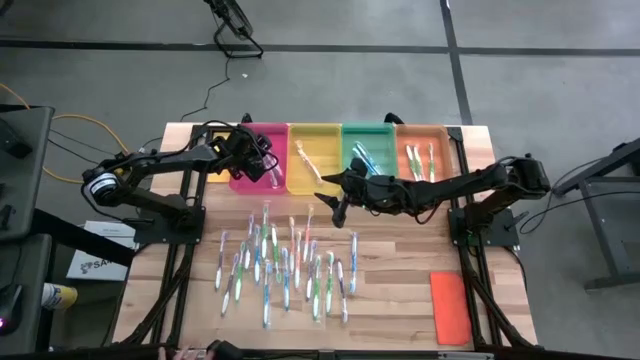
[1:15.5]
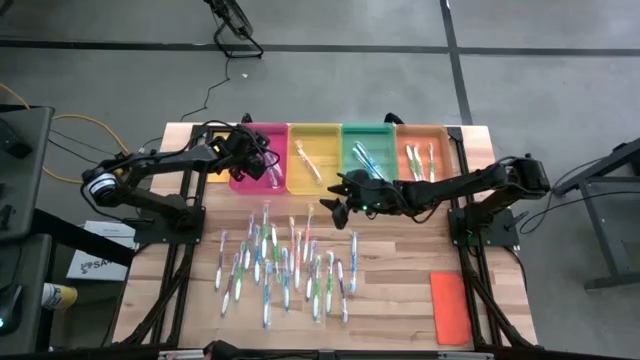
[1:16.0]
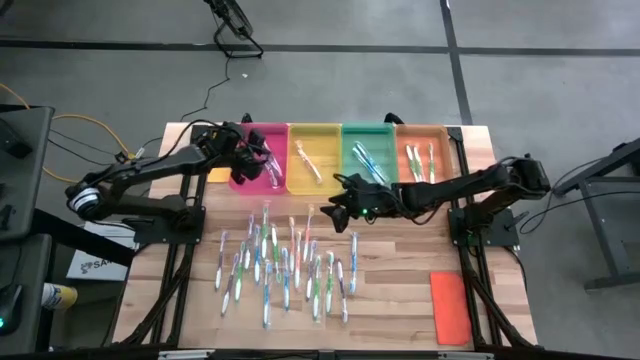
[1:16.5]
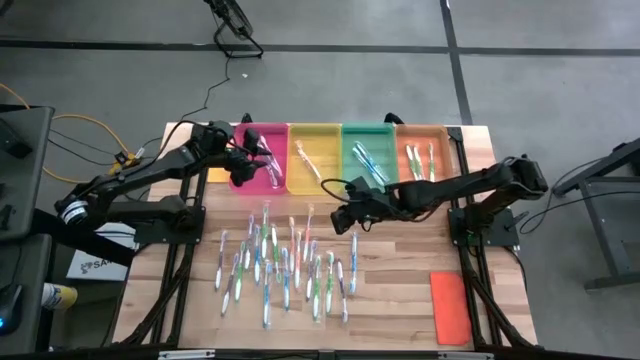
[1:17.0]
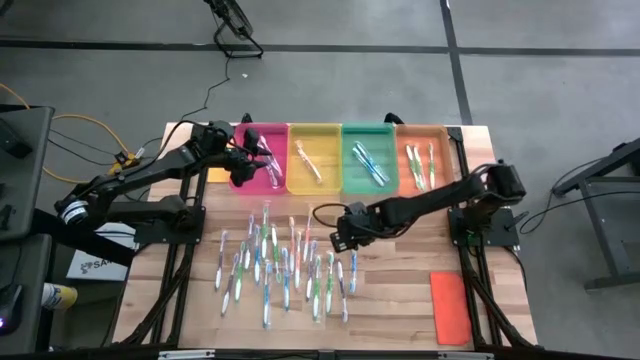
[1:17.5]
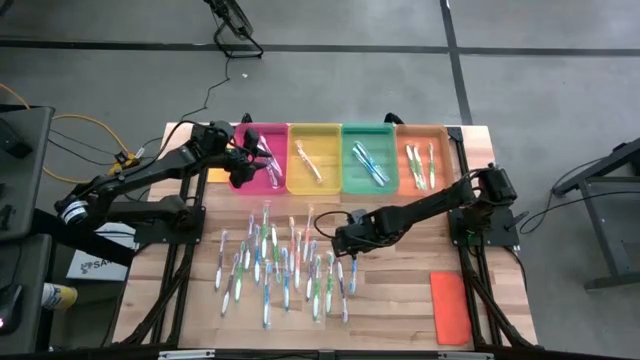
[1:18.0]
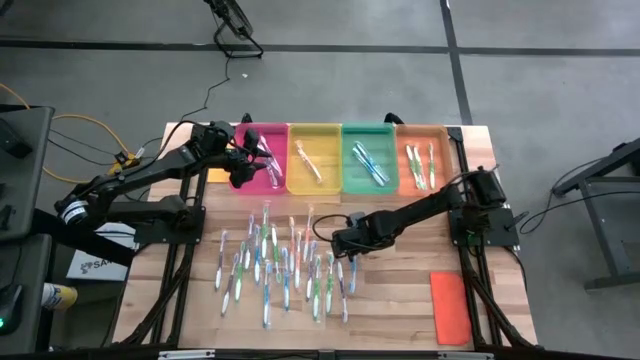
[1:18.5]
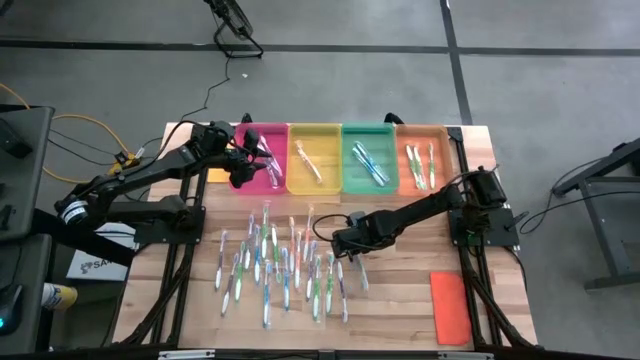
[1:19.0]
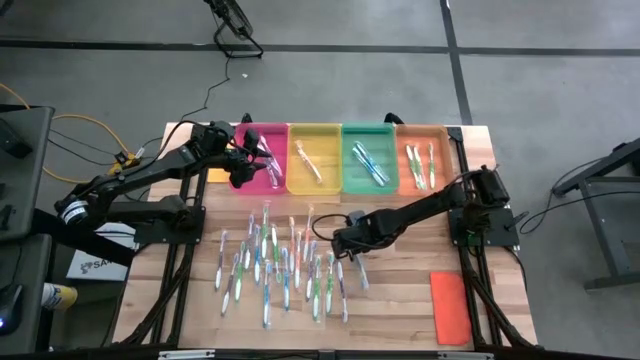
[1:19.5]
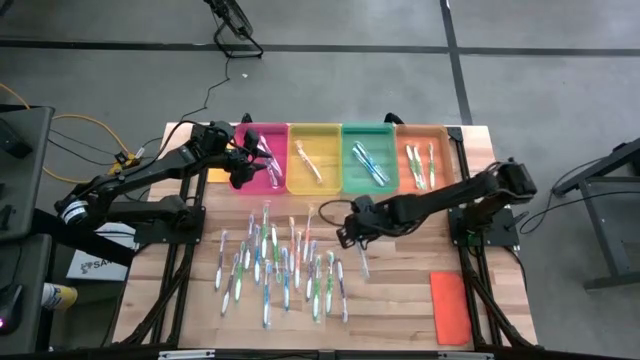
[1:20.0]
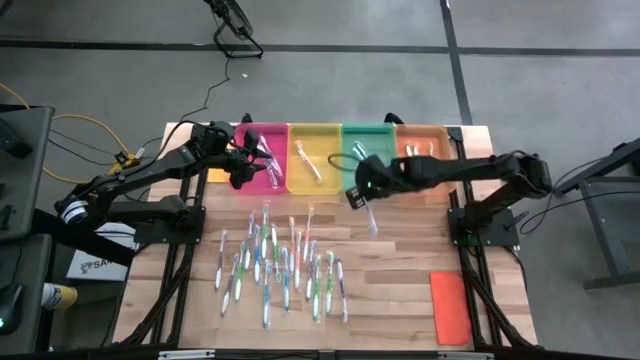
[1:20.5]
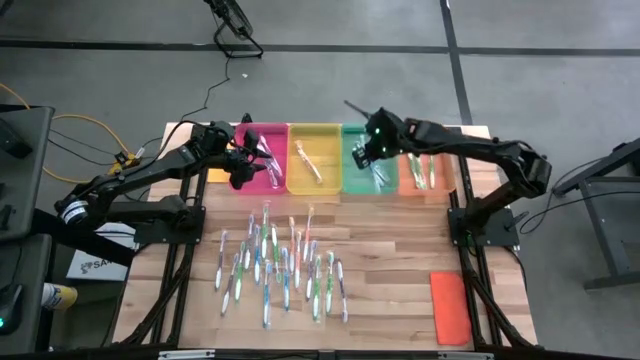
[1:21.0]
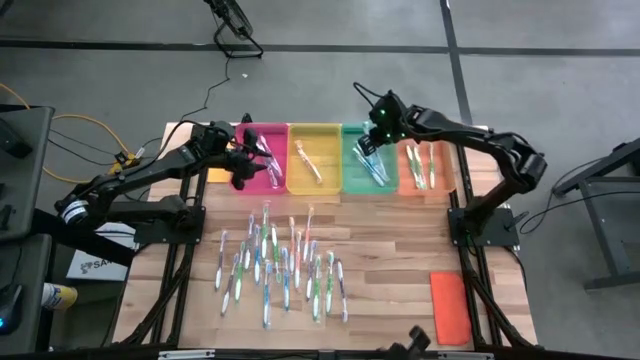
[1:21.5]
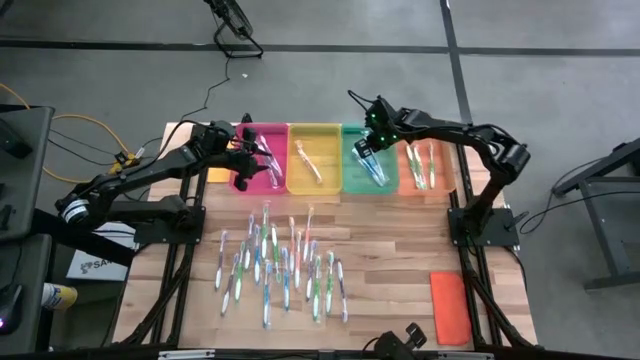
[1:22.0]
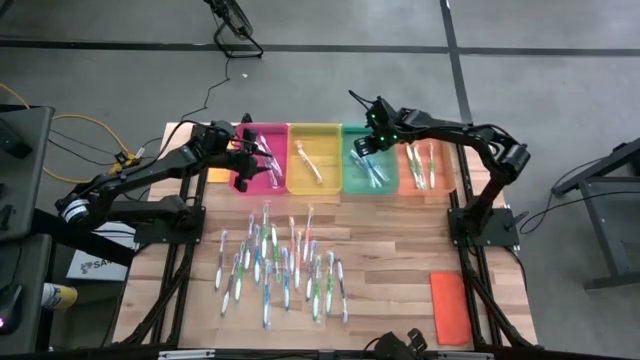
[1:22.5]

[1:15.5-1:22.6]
Task: Pick & Place Toothbrushes
Put the blue toothbrush into the green bin

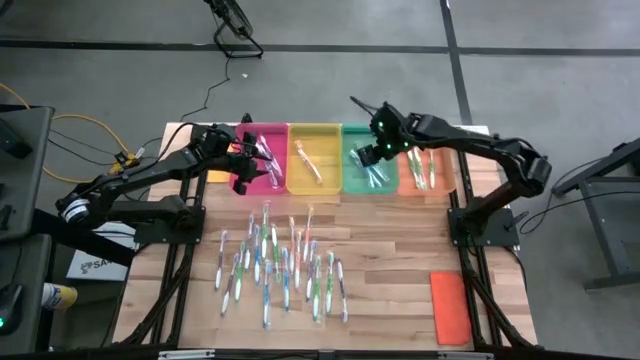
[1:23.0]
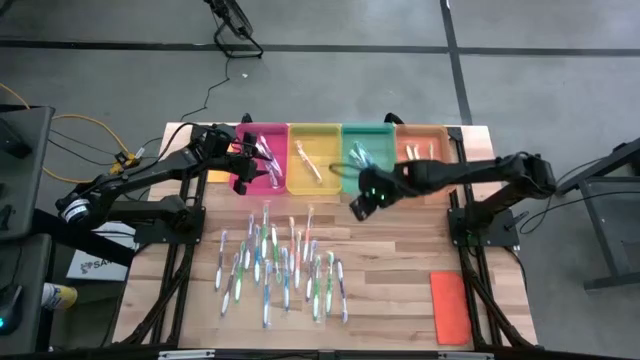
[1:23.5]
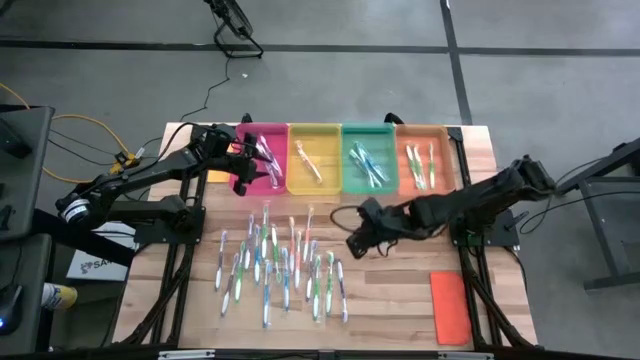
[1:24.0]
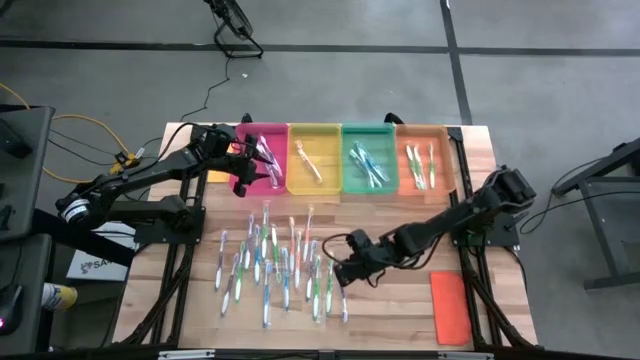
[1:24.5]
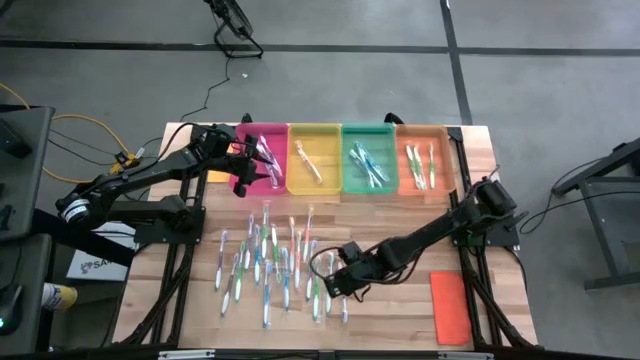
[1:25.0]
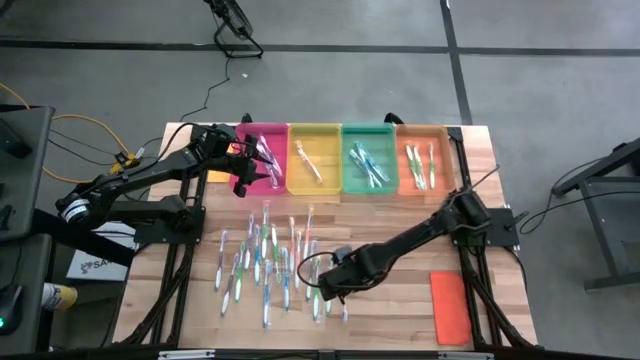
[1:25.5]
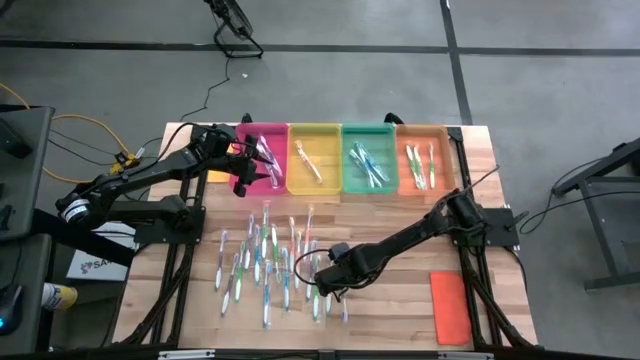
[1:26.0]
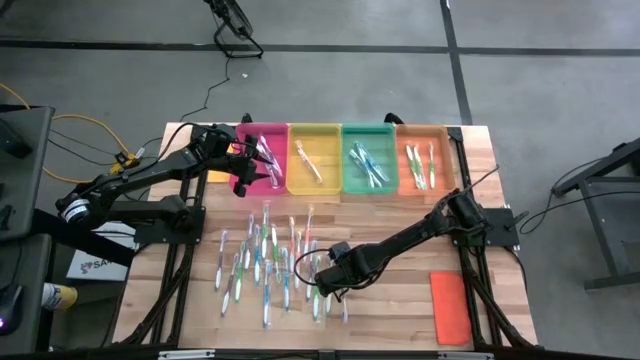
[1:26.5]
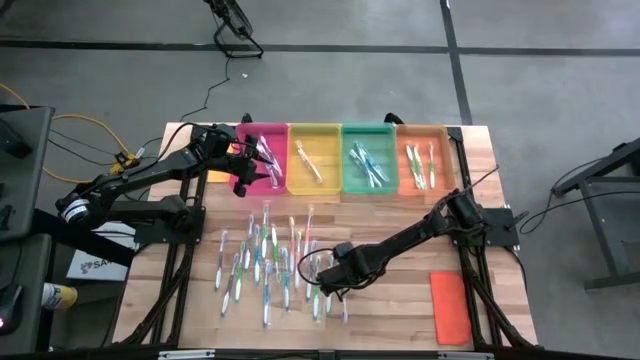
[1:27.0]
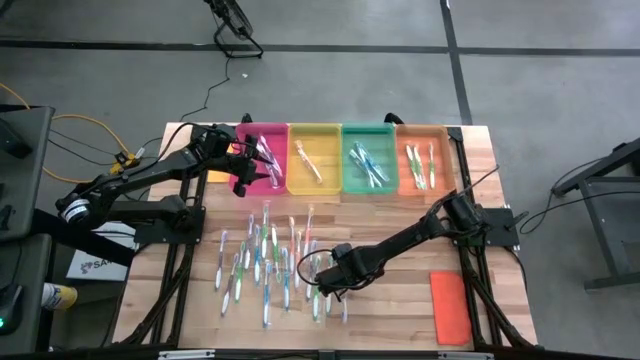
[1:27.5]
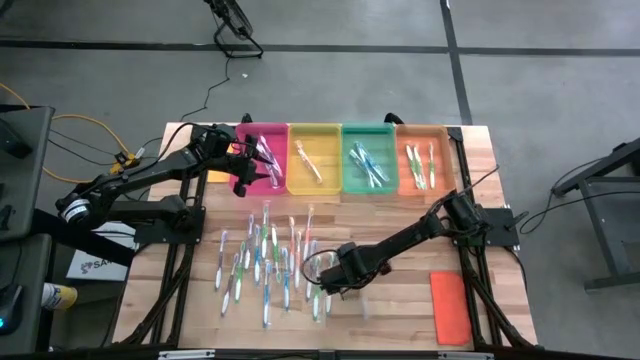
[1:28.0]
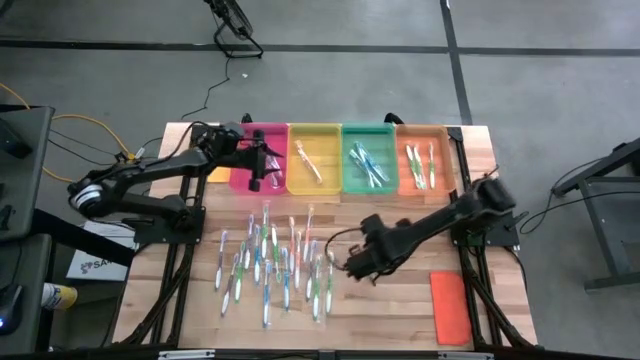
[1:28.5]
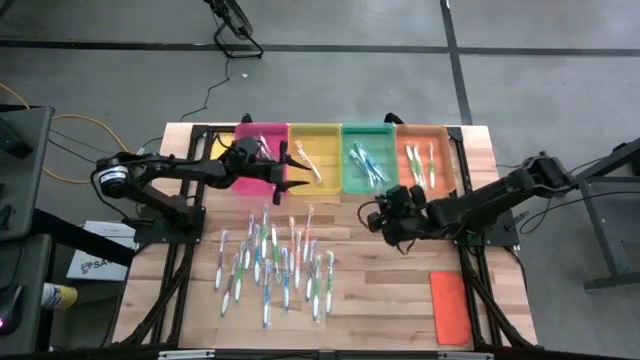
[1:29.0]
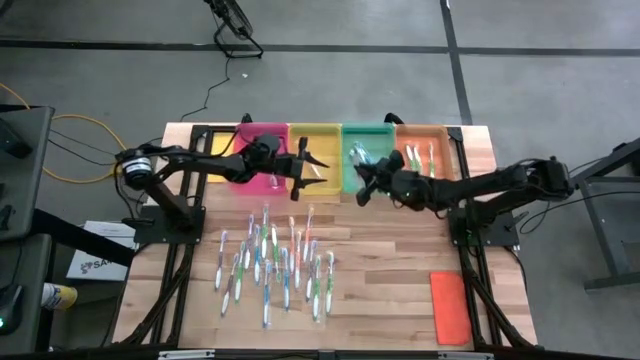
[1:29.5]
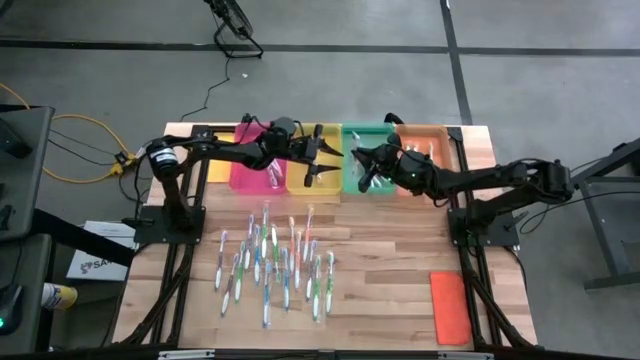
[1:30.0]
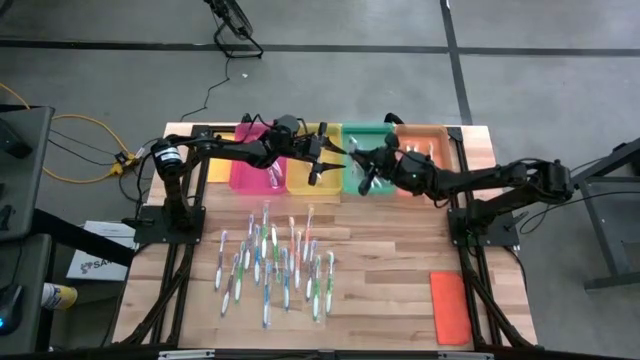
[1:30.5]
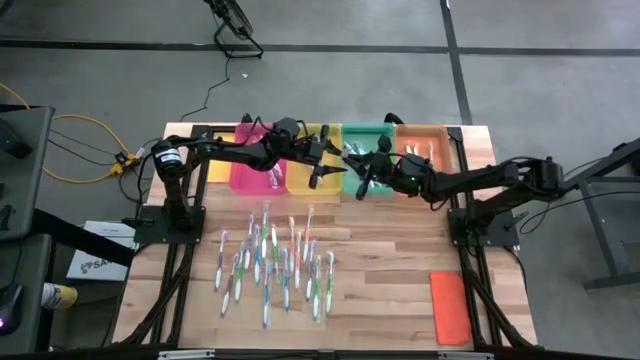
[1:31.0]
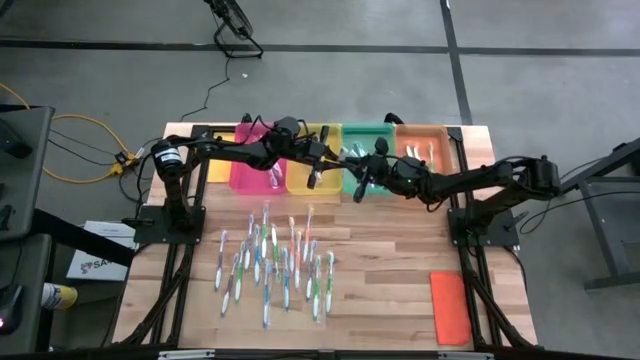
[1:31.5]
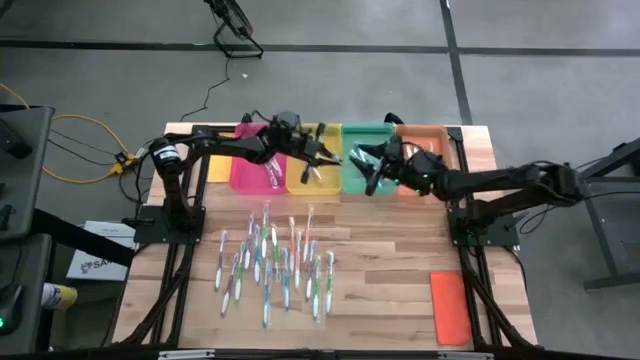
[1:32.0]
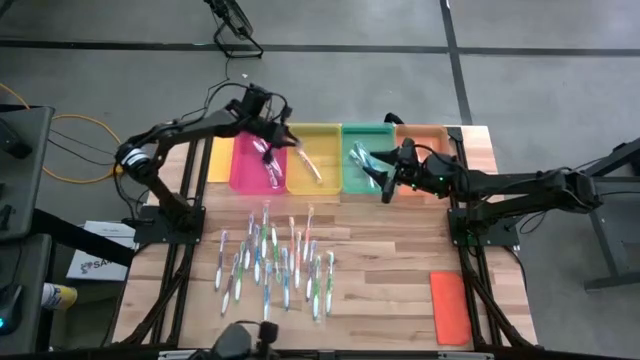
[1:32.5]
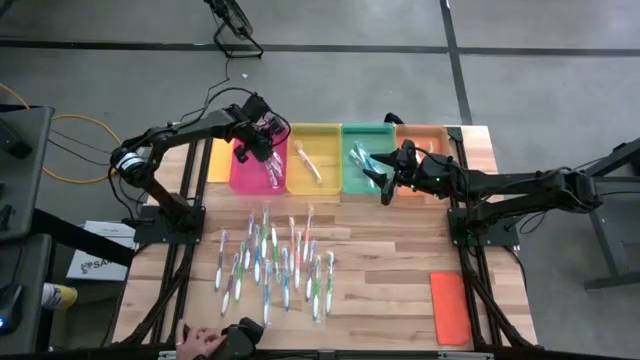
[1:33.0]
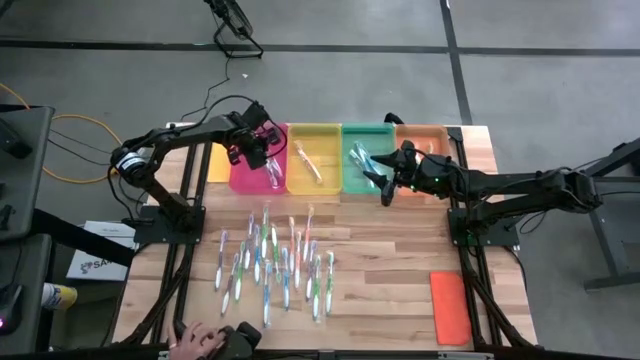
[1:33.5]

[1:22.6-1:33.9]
Put the purple toothbrush into the pink bin

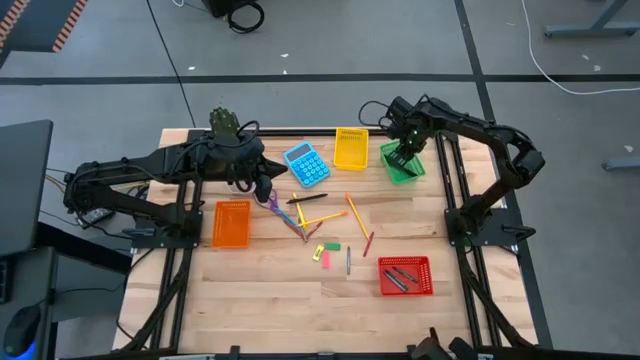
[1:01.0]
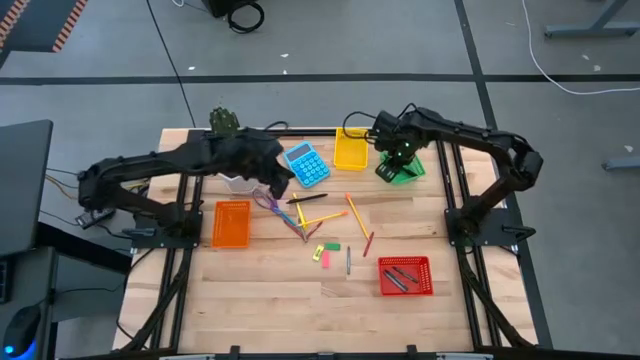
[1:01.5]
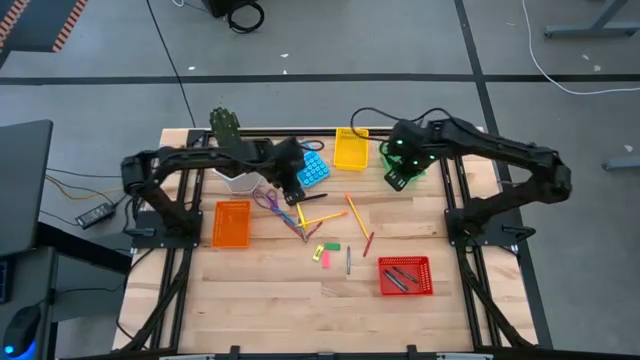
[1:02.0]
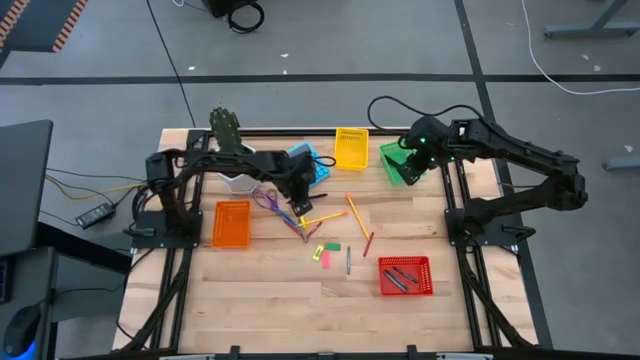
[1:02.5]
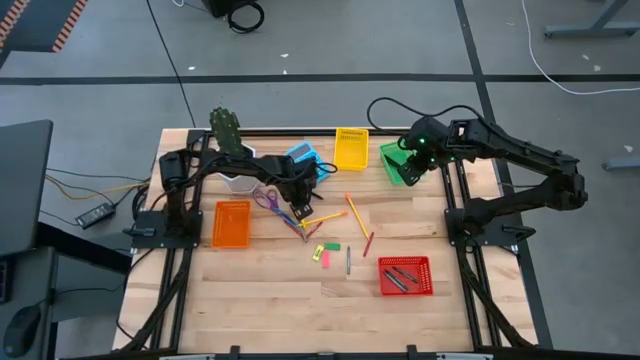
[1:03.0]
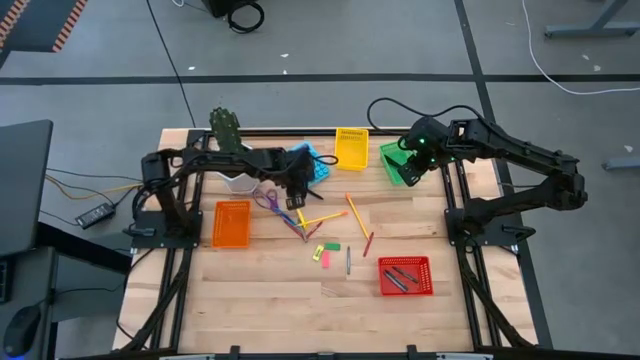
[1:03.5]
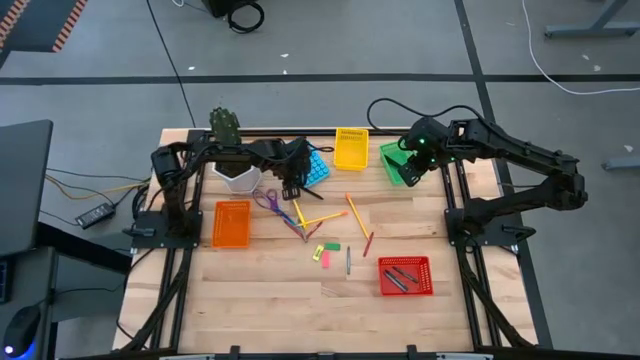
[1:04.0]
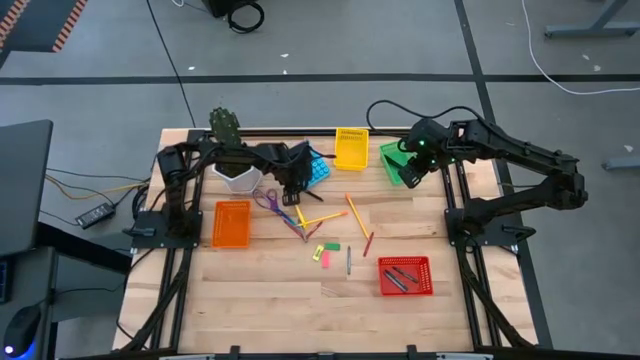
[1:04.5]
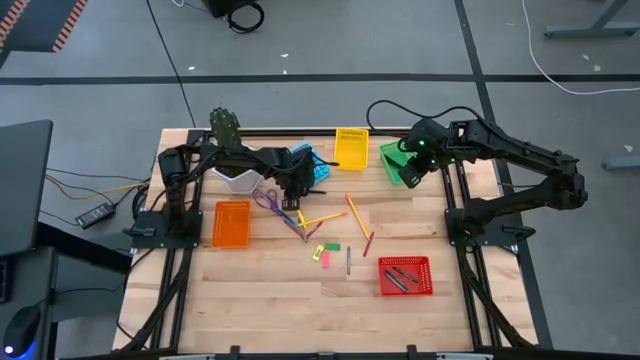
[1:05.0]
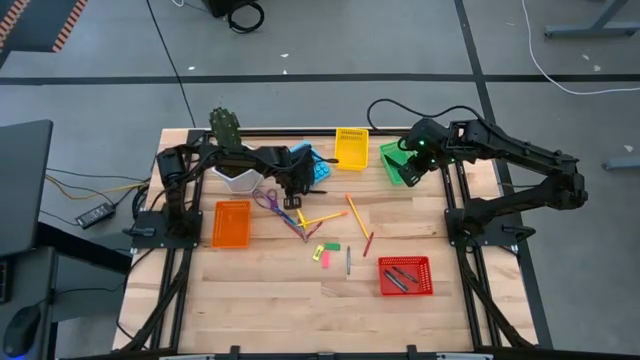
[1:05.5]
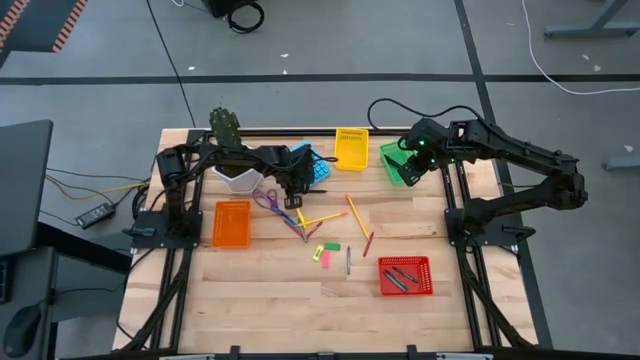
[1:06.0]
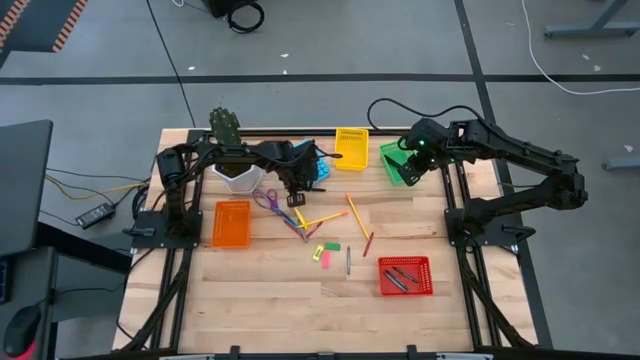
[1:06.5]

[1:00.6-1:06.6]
Task: Sort crayons/erasers/pens/pencils in bins
Put the black pen into the green bin
